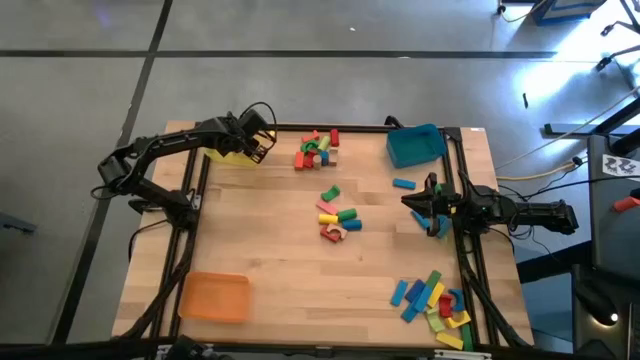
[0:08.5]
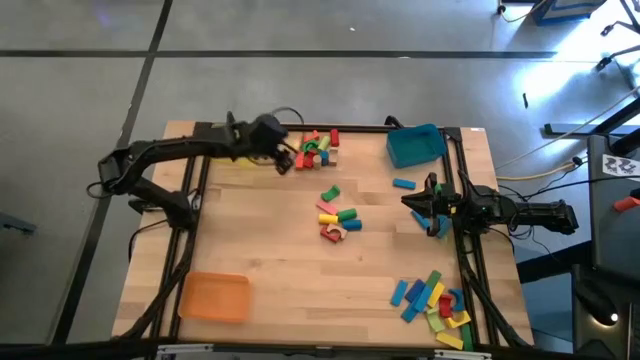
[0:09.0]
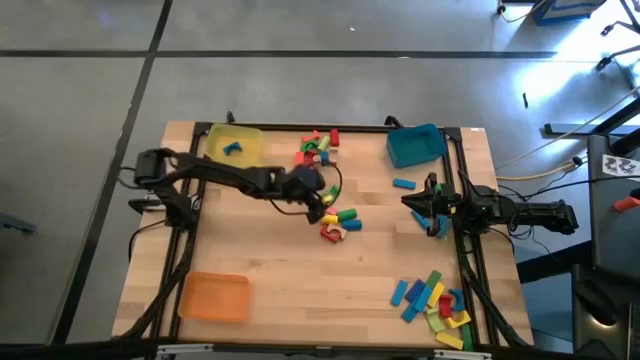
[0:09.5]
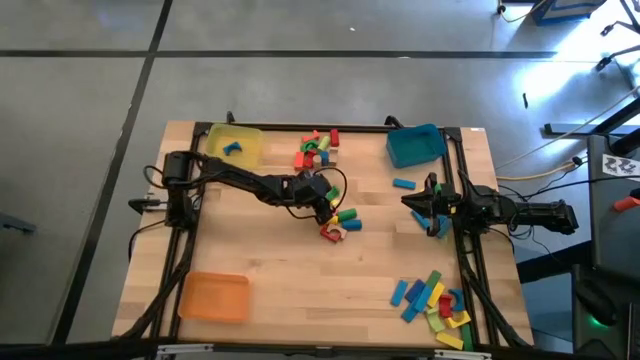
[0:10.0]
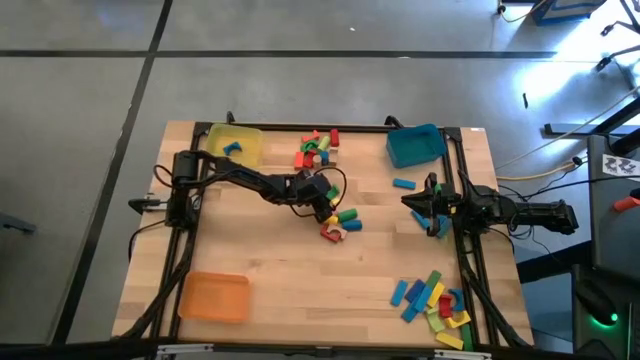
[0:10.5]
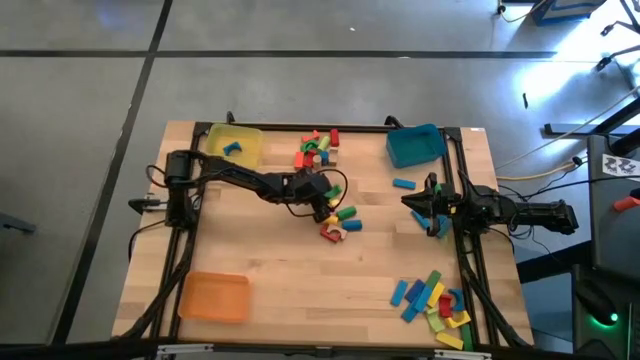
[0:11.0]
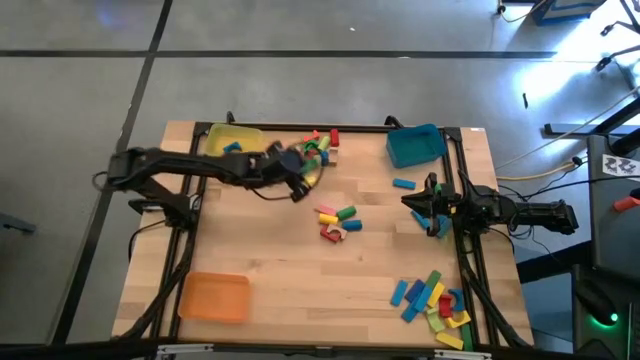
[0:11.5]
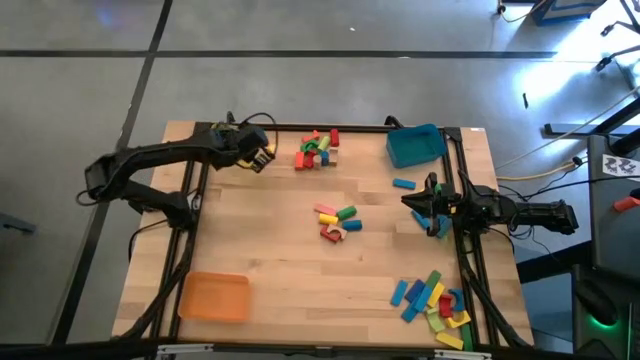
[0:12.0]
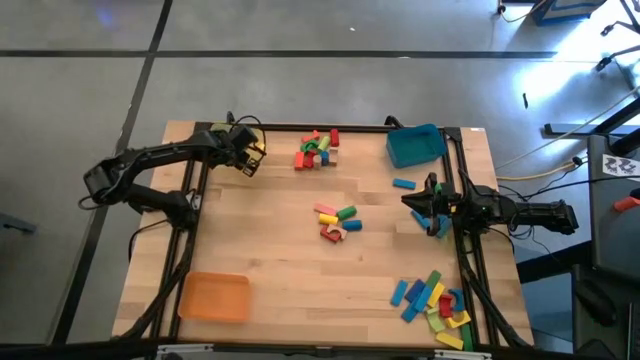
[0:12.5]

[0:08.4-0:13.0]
Task: Sort blocks by size
Put the green arch block into the yellow bin

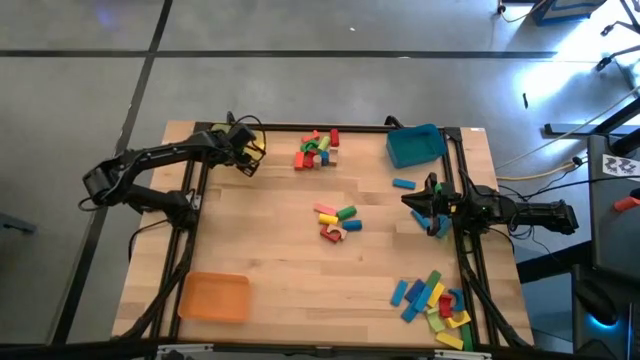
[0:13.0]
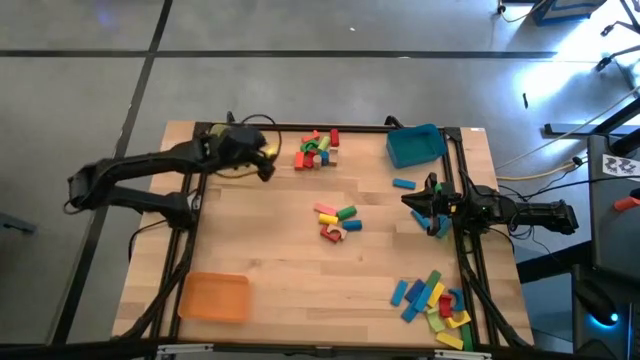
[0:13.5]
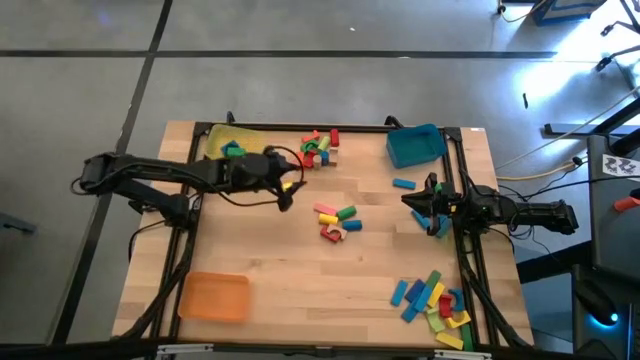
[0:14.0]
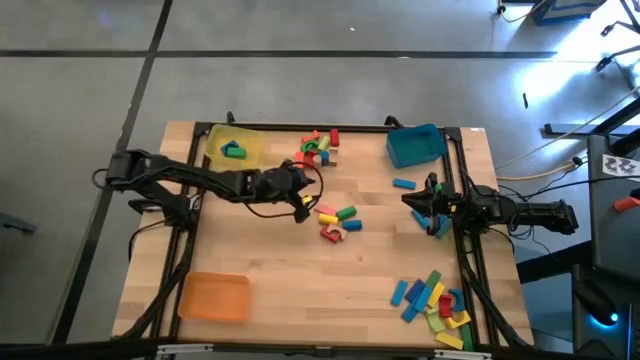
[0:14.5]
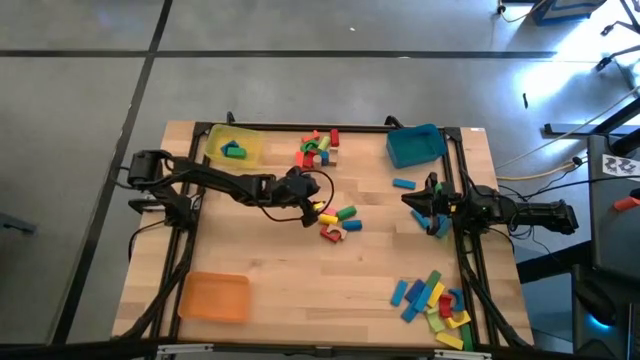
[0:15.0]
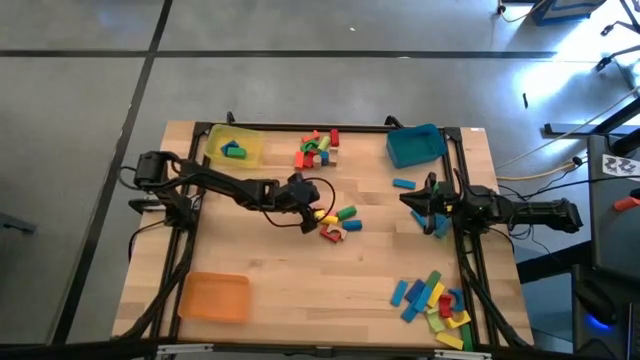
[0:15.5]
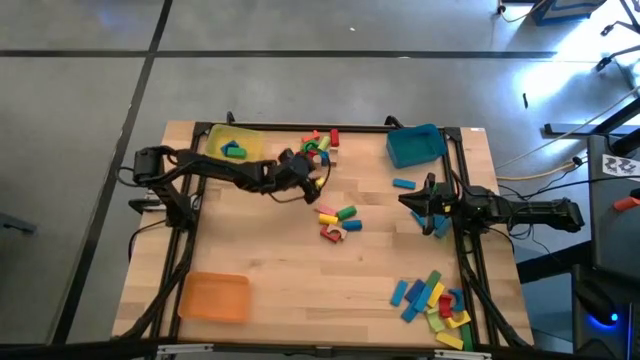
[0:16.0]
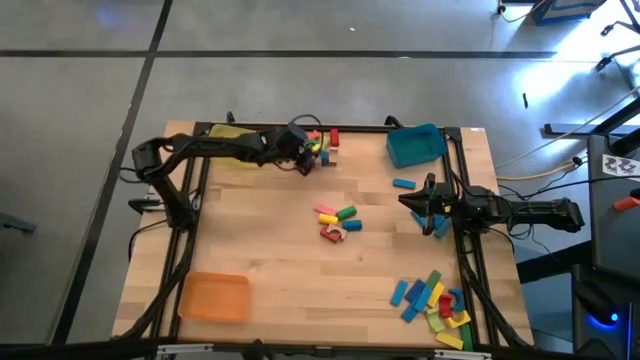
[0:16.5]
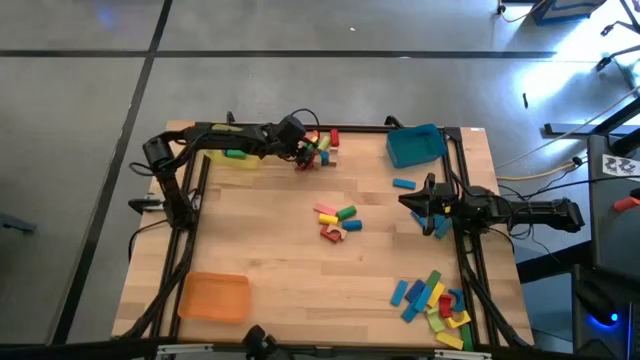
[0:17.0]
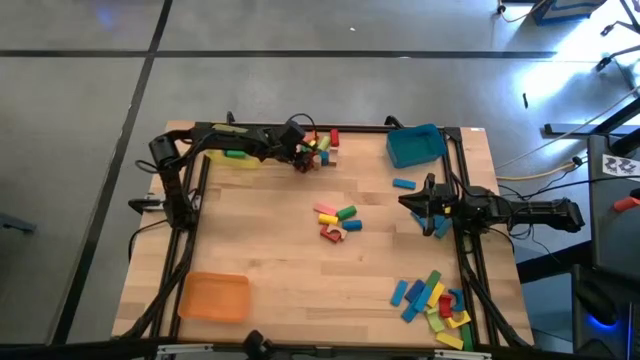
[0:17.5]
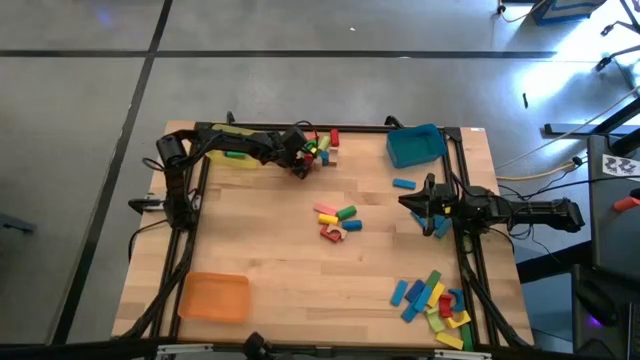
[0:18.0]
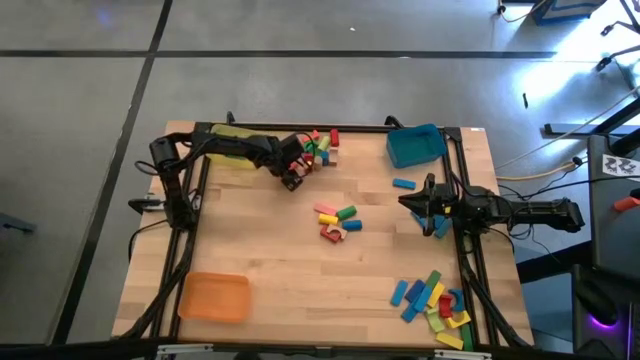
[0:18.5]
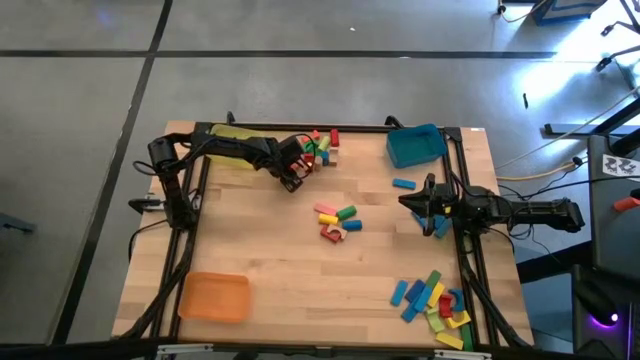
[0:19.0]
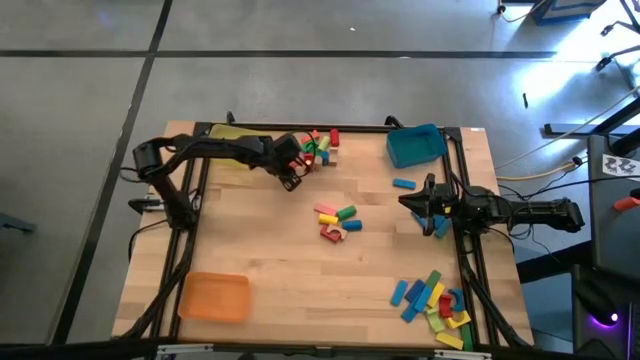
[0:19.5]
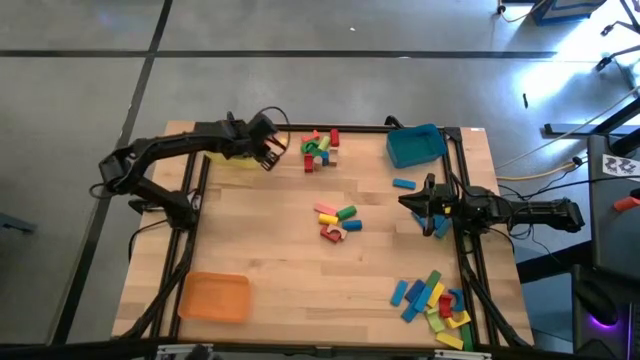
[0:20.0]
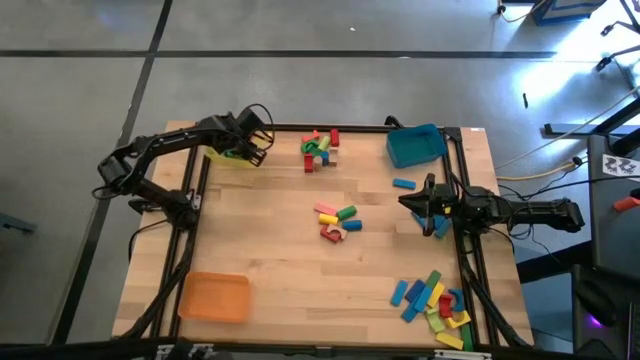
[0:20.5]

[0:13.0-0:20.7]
Put the orange arch block into the yellow bin

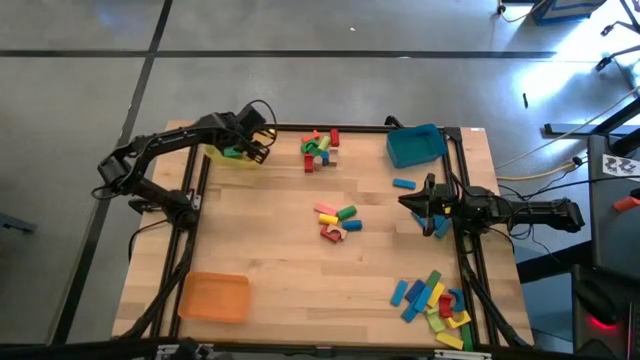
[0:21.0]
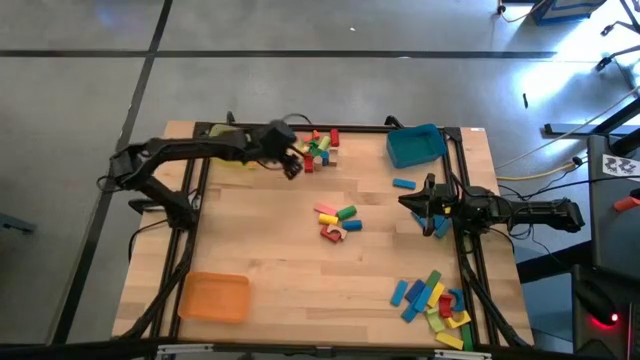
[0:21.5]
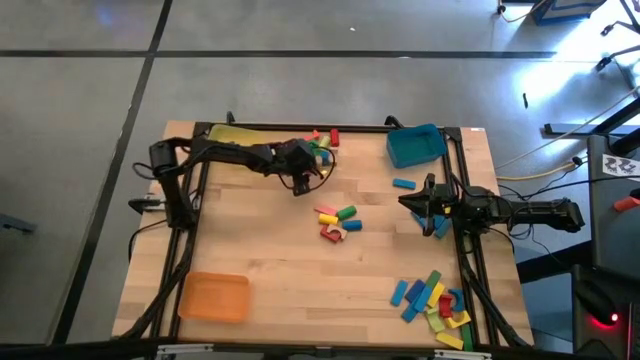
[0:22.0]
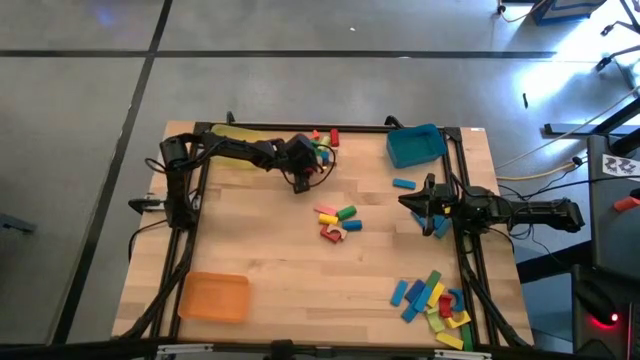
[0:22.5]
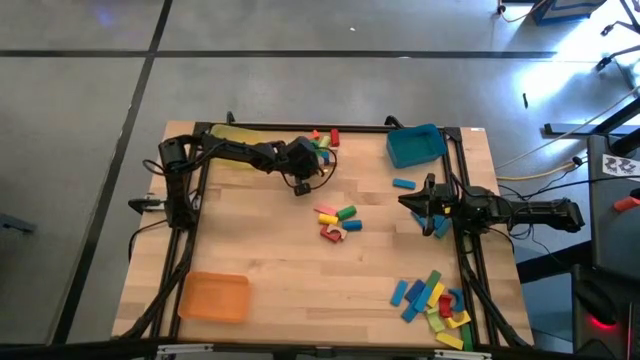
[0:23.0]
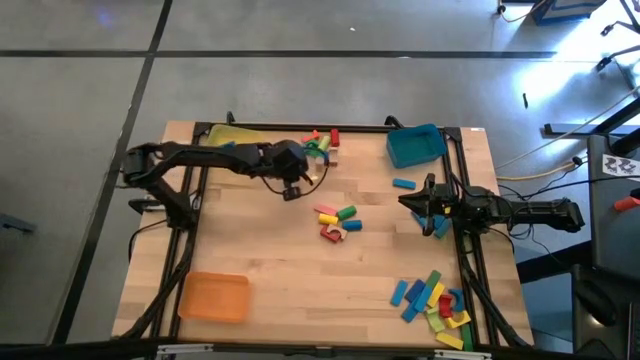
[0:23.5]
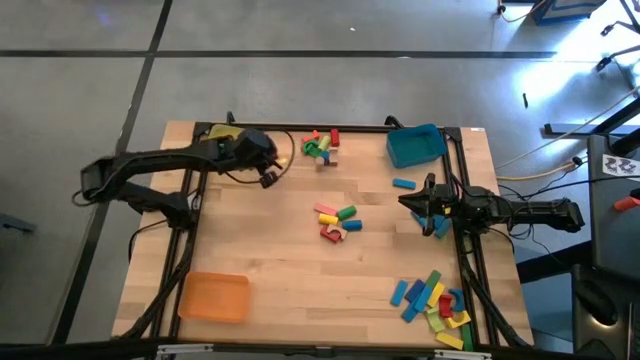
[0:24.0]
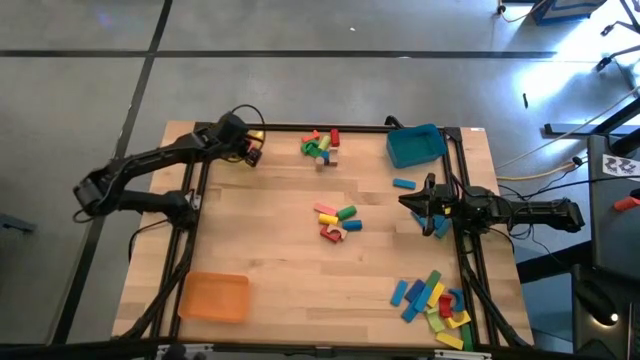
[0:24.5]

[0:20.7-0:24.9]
Put the red arch block into the yellow bin

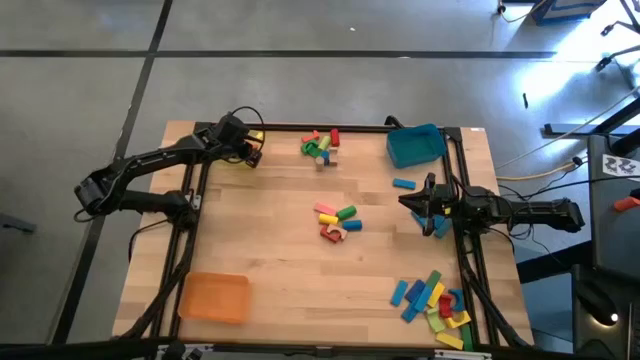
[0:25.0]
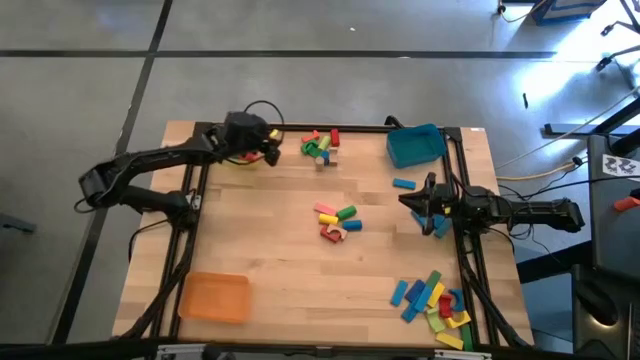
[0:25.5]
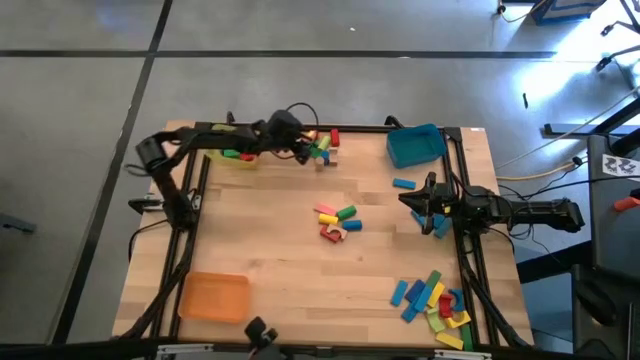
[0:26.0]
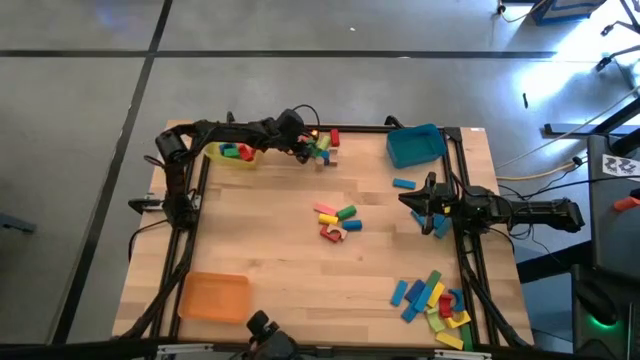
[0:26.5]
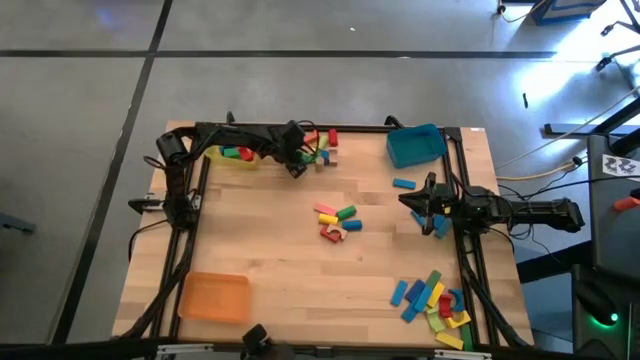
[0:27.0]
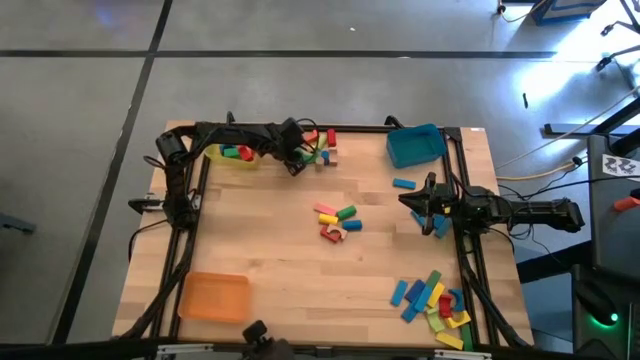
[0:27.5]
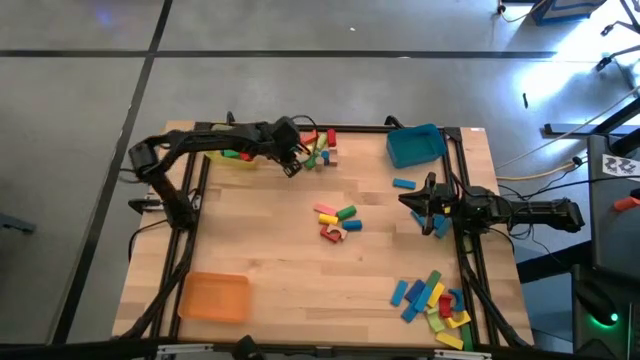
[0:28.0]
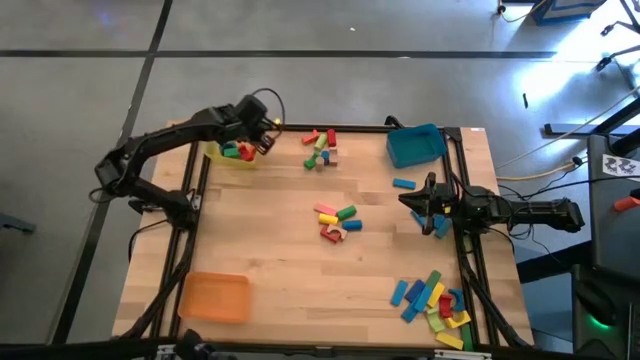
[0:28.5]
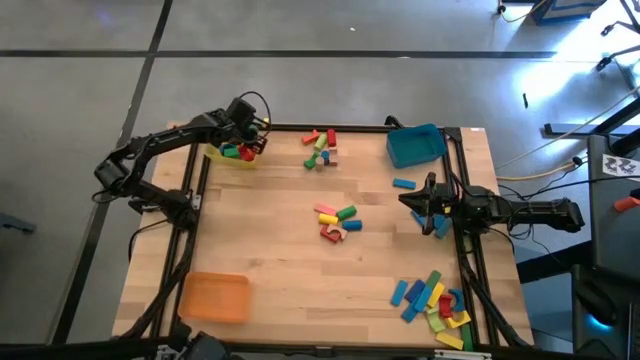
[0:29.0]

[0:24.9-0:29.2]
Put the green arch block into the yellow bin
